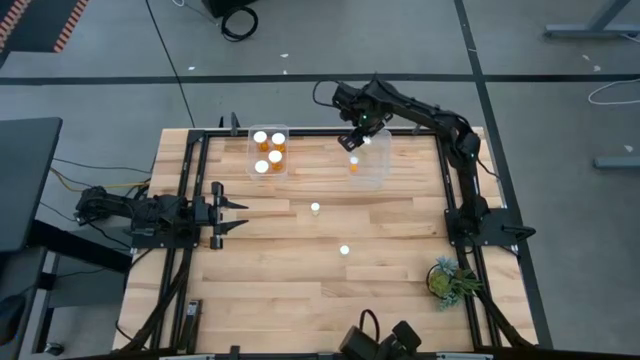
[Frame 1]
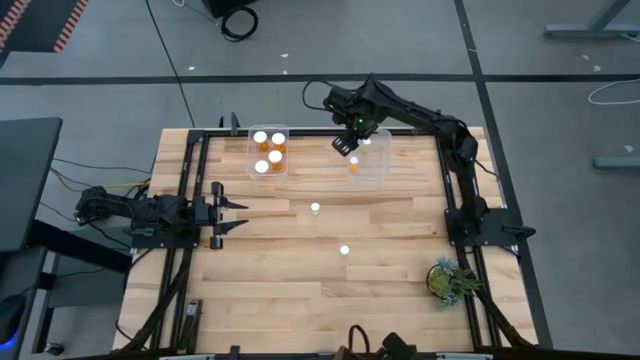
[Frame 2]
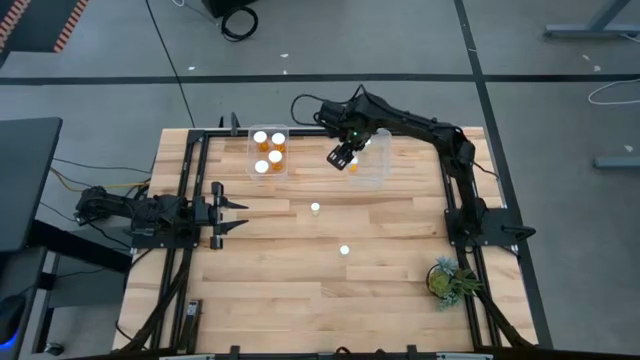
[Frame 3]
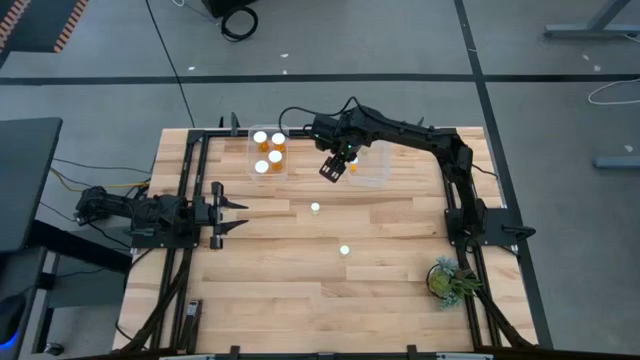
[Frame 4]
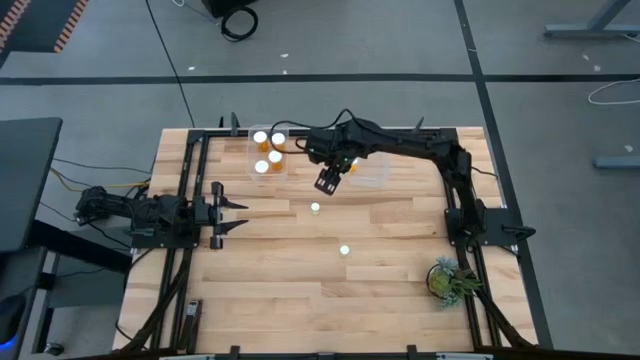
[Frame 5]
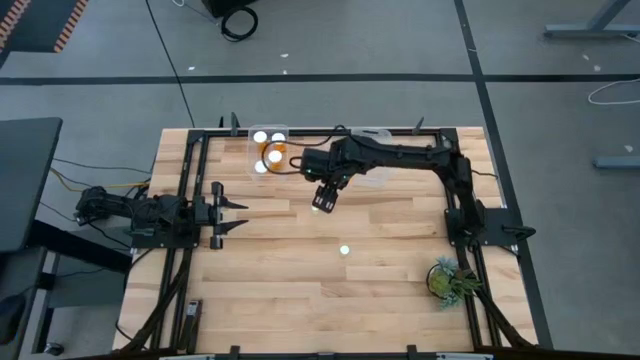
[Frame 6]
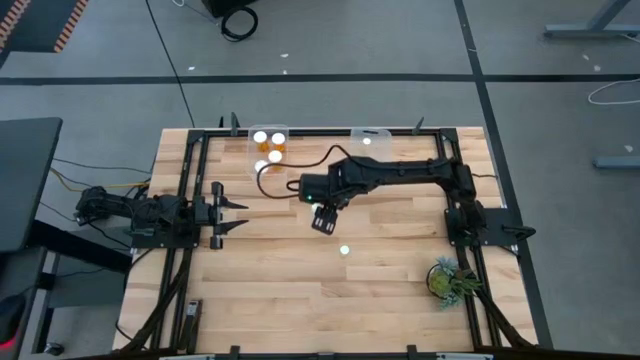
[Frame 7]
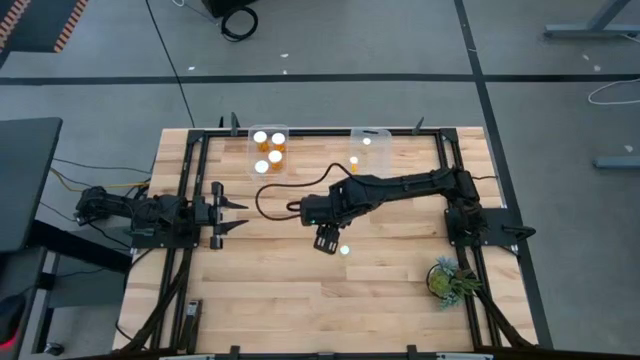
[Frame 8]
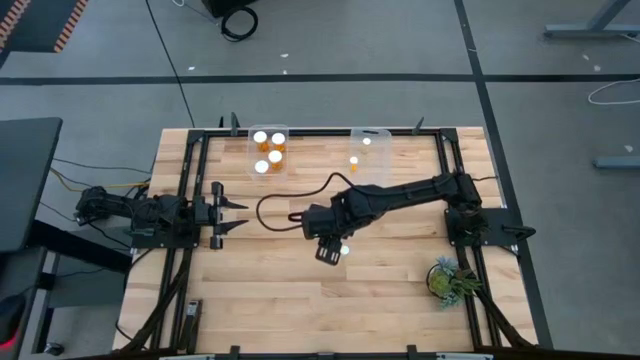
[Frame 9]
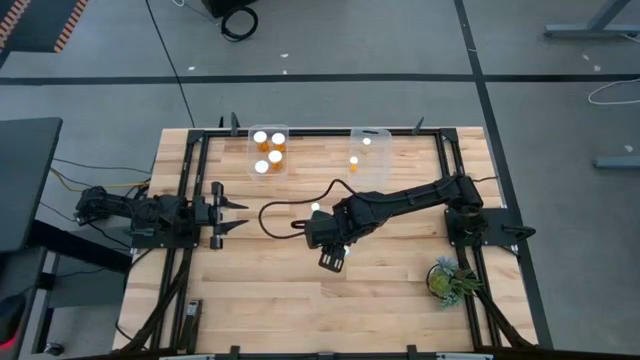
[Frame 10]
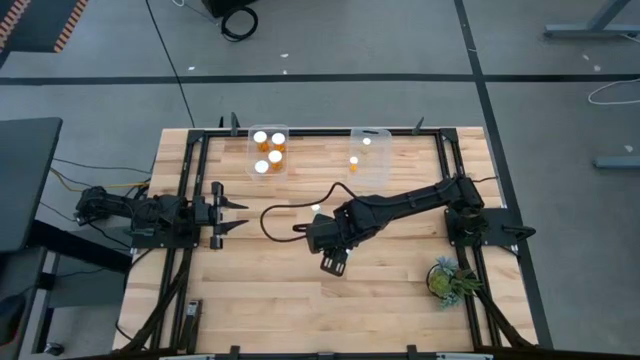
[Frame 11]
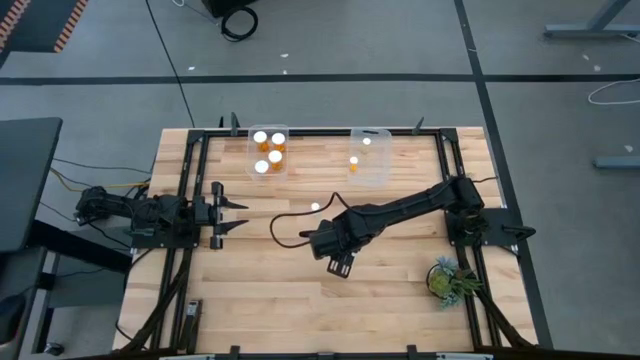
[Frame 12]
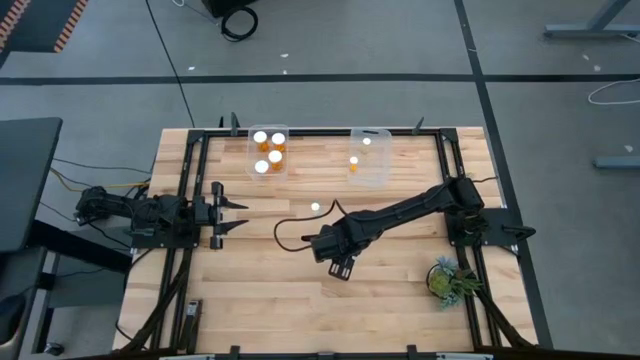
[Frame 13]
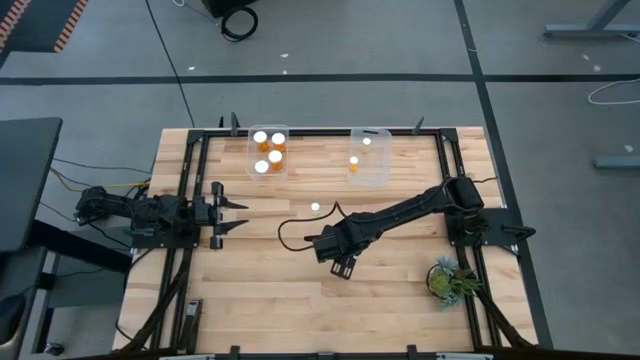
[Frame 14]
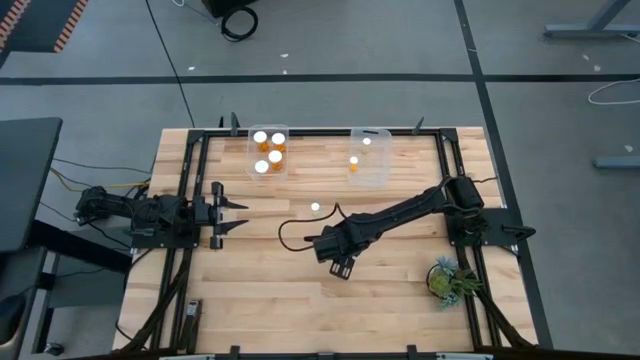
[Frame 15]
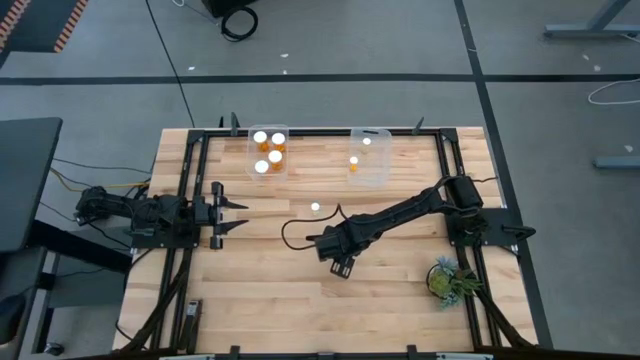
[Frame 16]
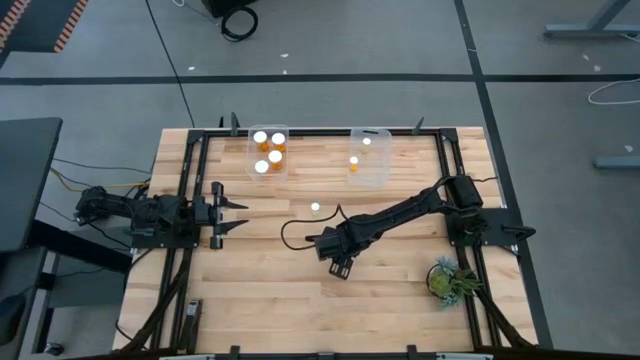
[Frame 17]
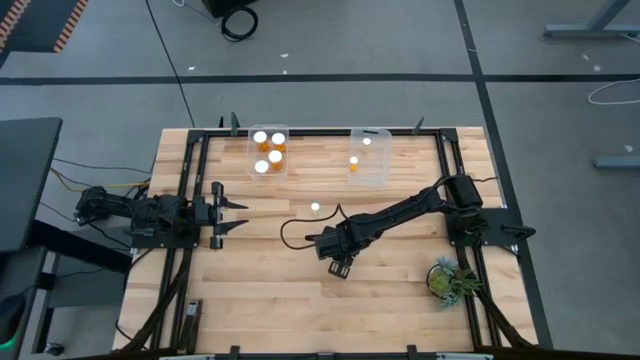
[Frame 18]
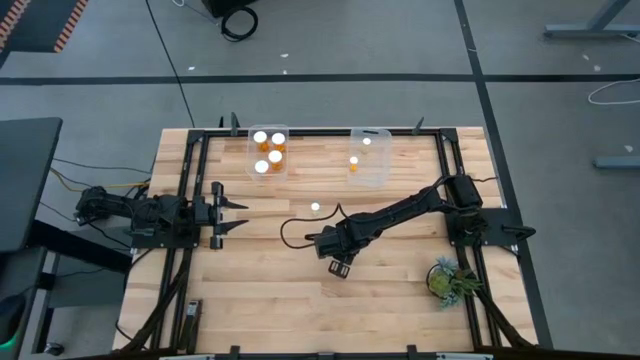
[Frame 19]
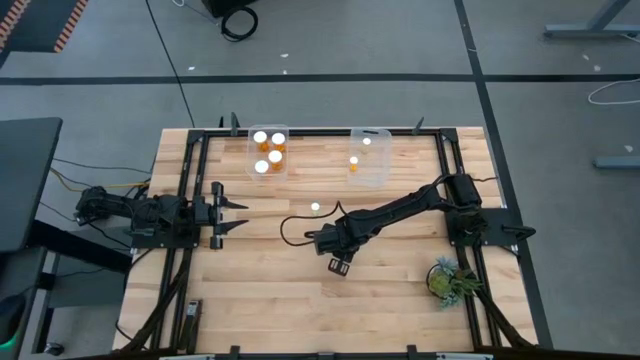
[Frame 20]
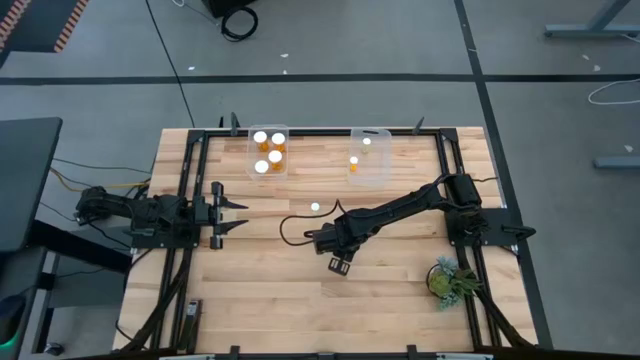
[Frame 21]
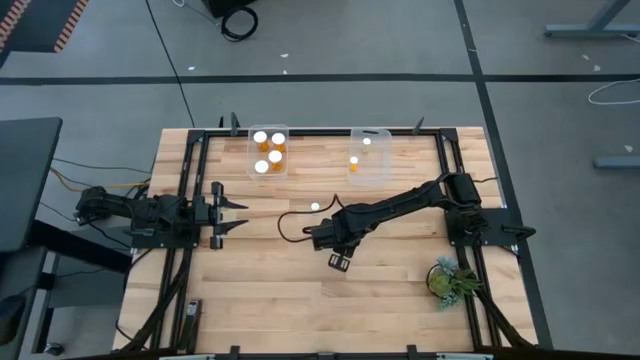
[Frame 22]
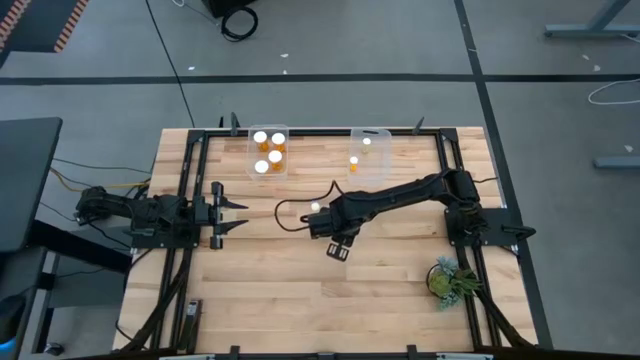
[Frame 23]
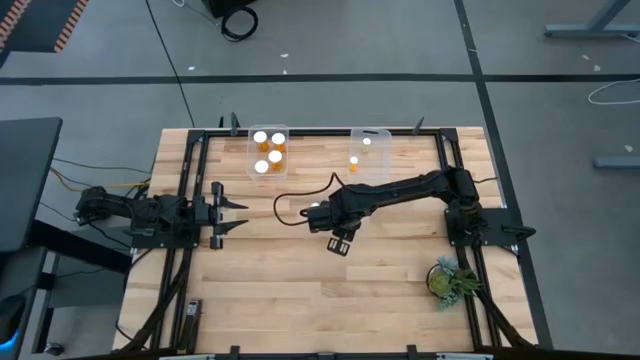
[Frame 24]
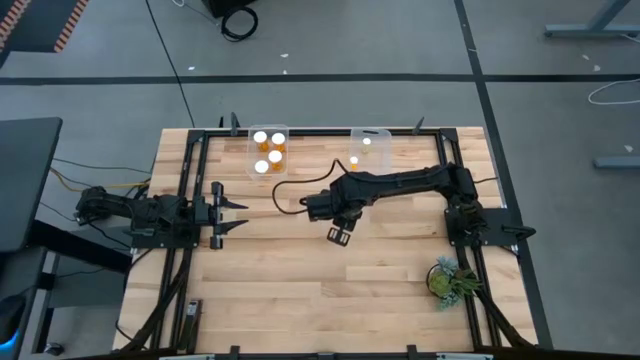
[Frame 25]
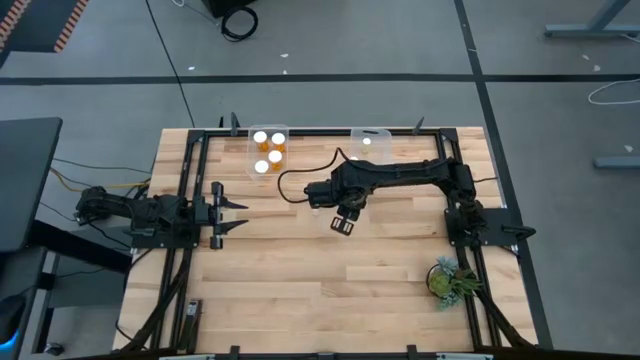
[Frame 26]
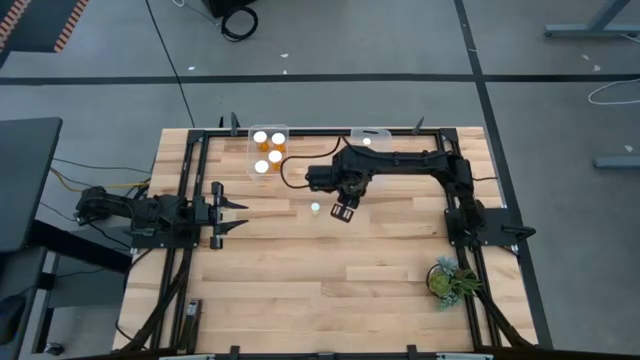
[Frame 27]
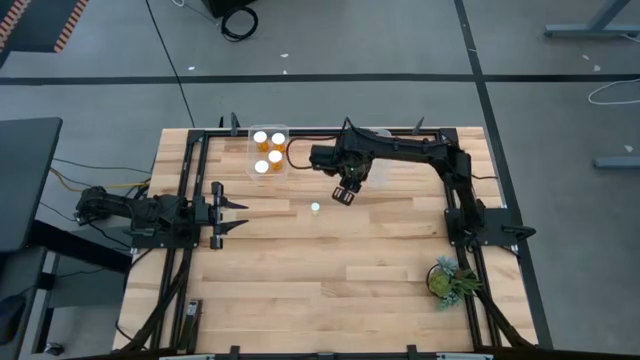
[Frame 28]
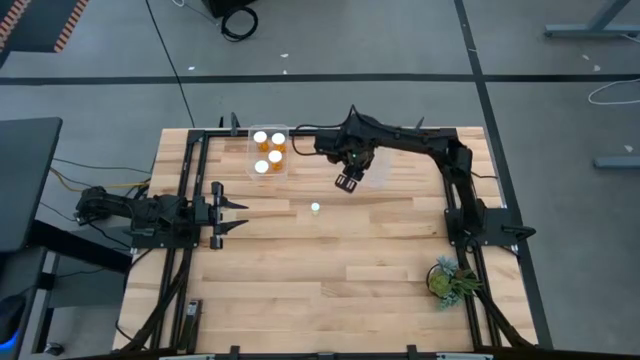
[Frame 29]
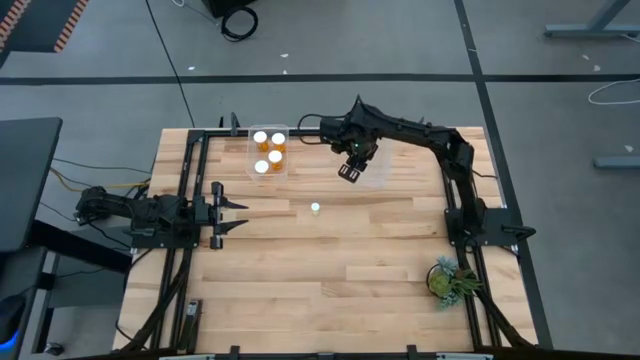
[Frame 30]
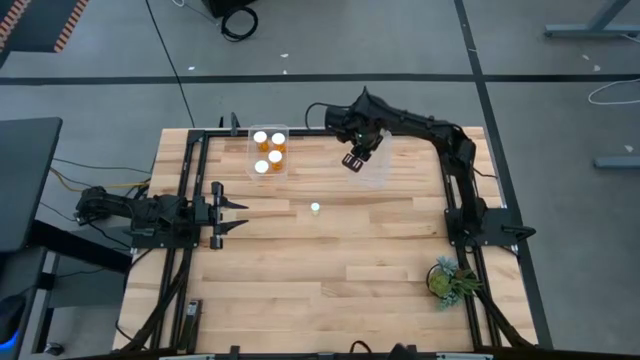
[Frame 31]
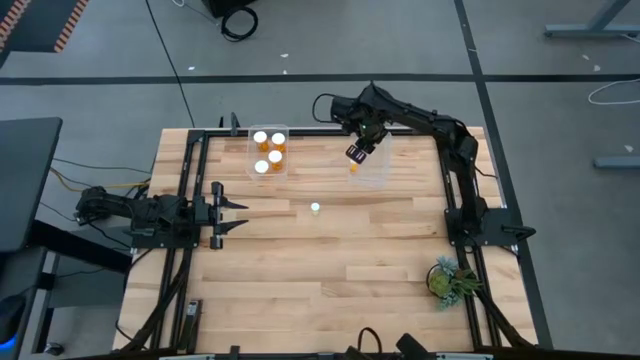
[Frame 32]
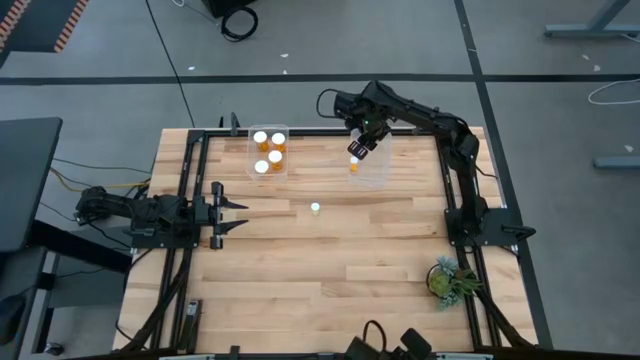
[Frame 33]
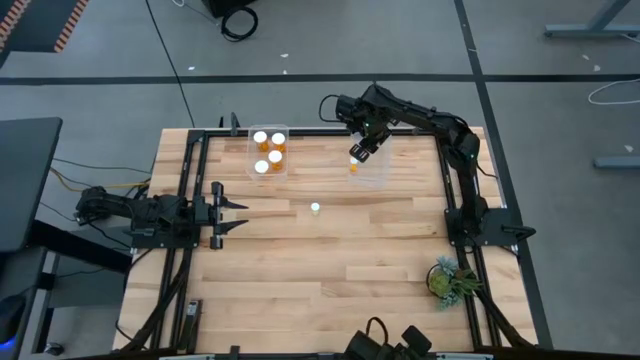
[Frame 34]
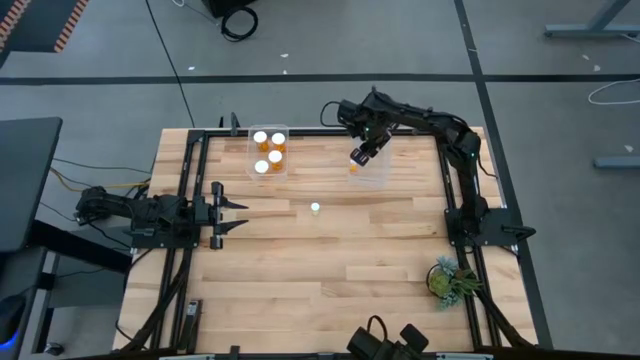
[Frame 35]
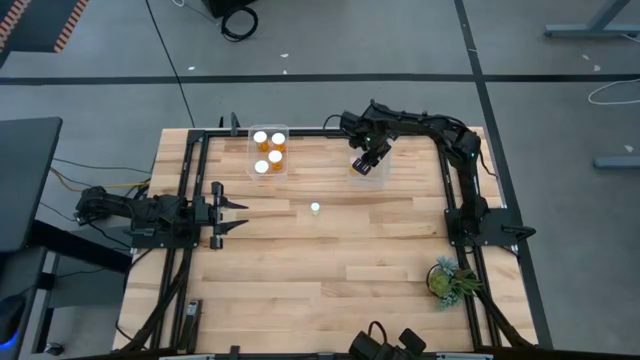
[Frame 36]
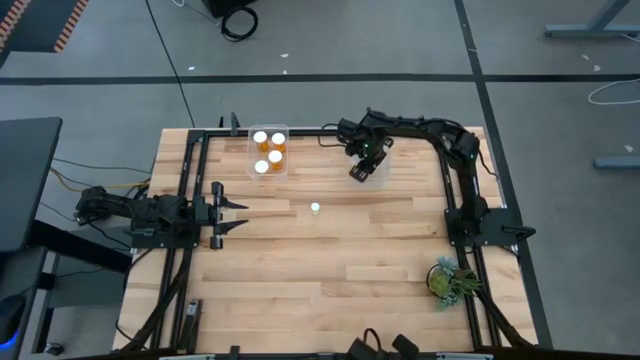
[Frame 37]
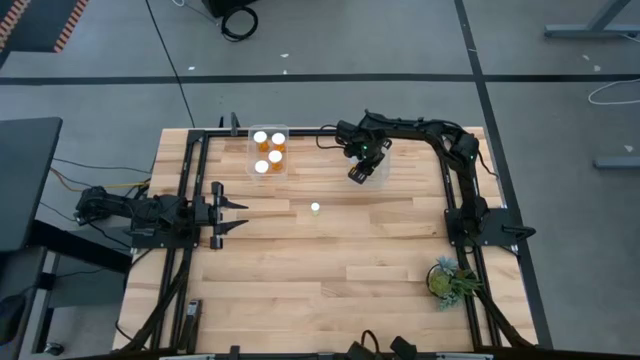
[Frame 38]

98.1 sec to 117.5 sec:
Task: Pick and place medicine bottles into bin by pill shape (circle, oval)
Put the yellow tablet bottle into the right transparent bin

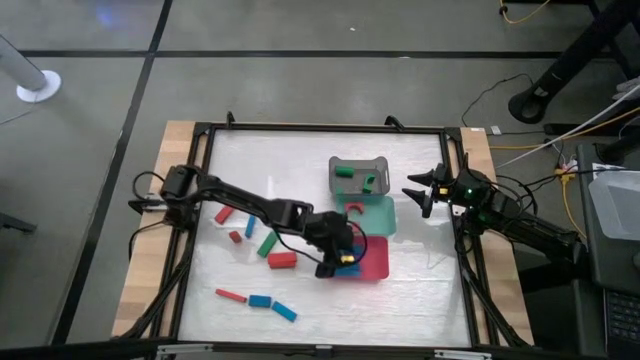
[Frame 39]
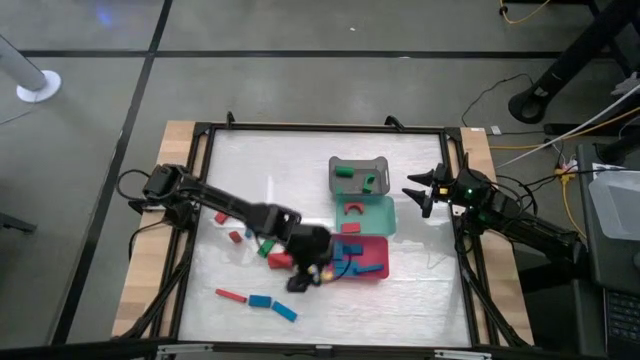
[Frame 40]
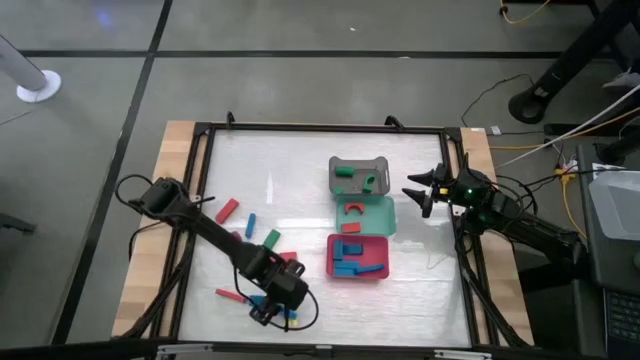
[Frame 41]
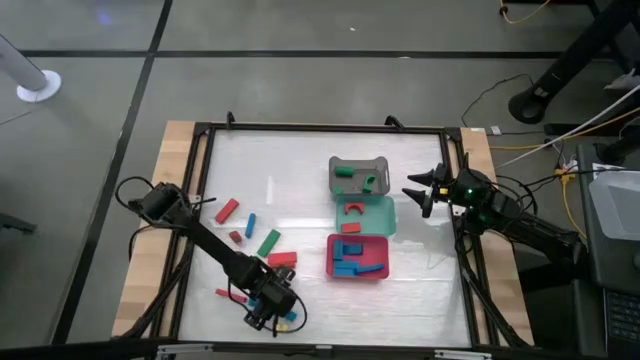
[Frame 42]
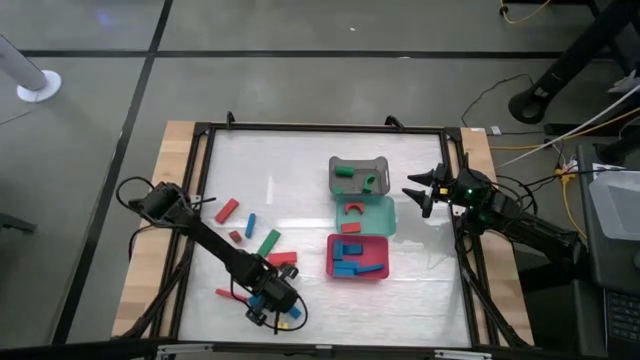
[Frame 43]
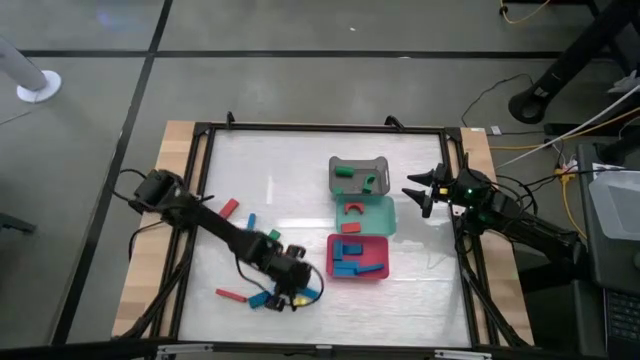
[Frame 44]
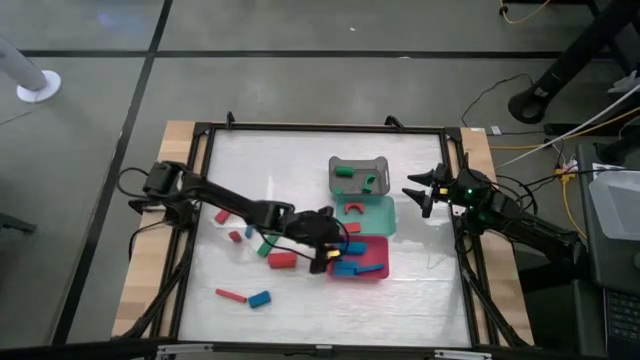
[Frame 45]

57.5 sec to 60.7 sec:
Task: Sort blocks
Put the blue block into the red bin
